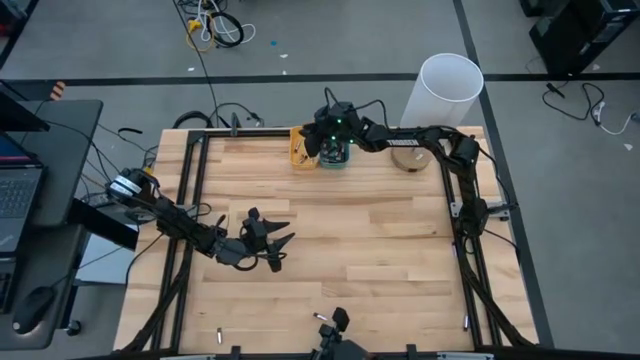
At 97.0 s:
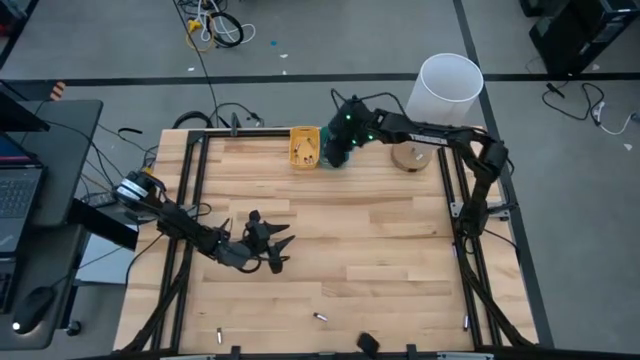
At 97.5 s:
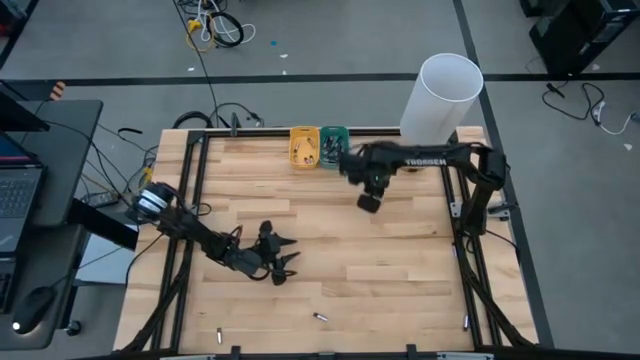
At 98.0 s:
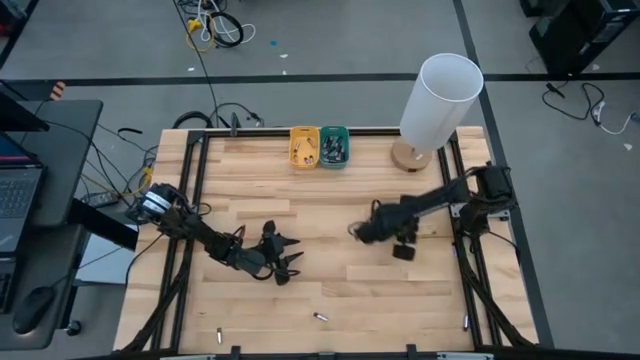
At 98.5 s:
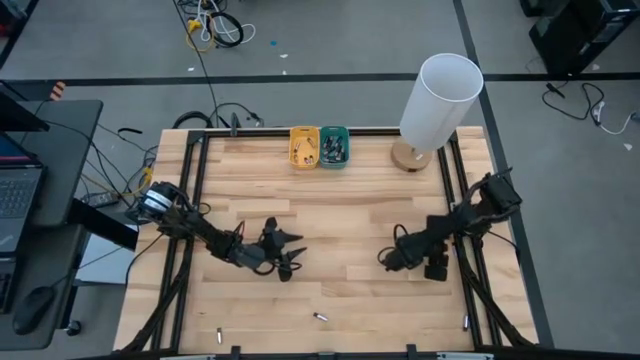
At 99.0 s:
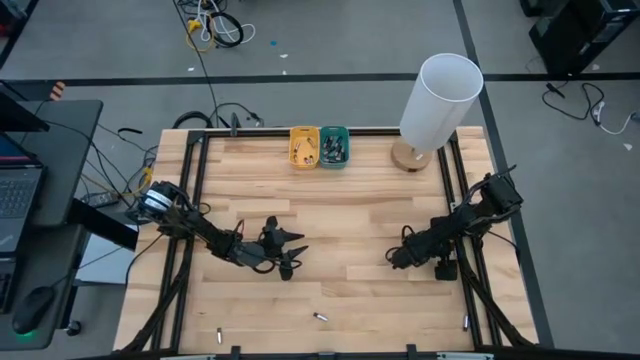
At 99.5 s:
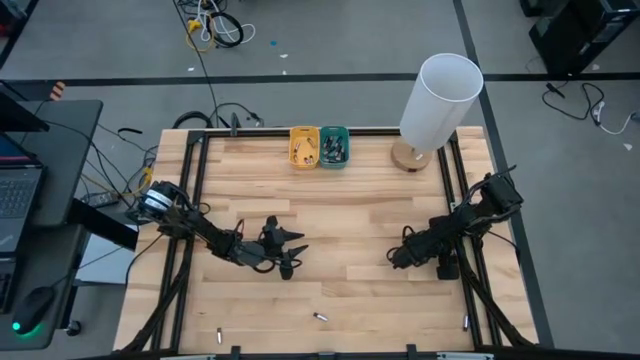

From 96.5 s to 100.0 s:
Task: Sort batteries
Put the silver battery into the yellow bin

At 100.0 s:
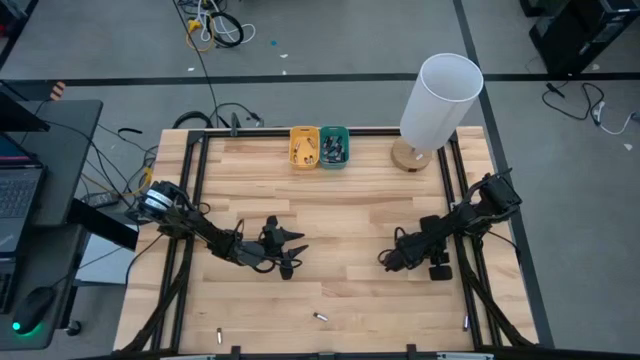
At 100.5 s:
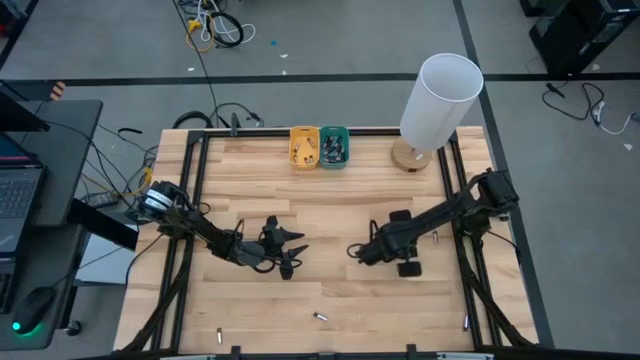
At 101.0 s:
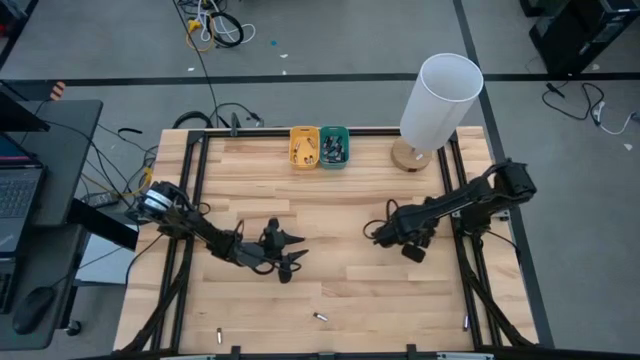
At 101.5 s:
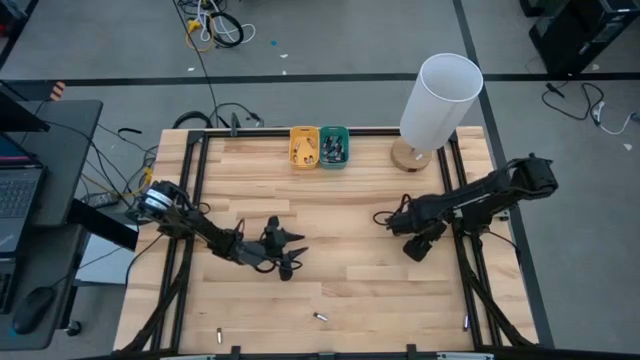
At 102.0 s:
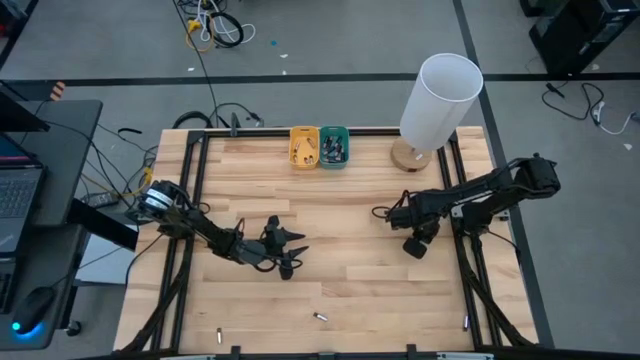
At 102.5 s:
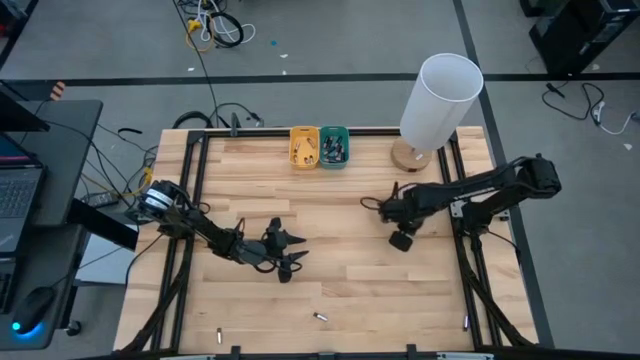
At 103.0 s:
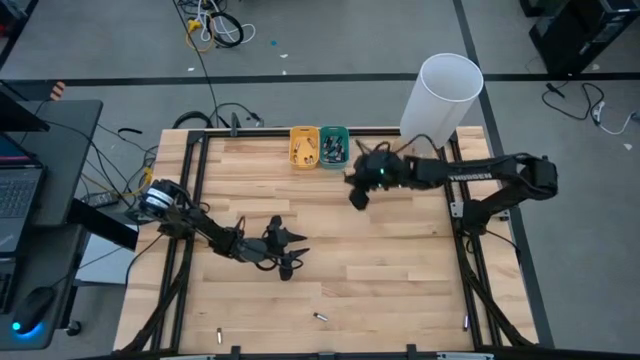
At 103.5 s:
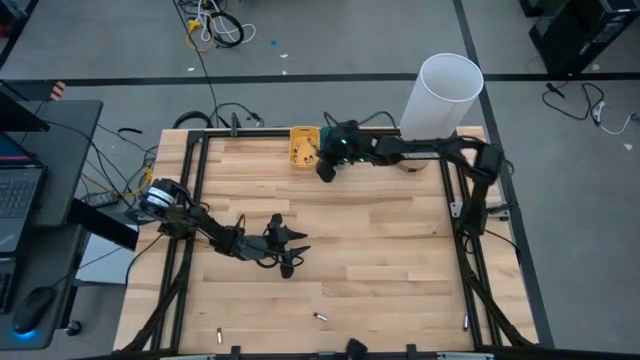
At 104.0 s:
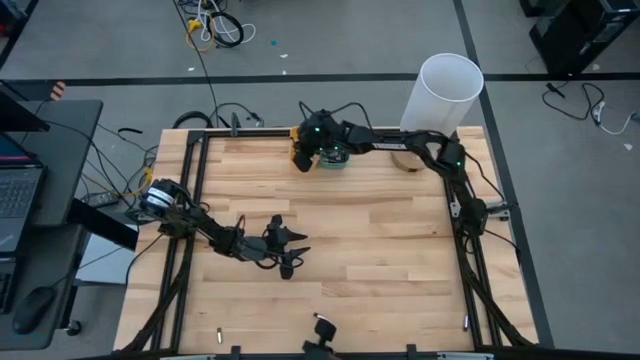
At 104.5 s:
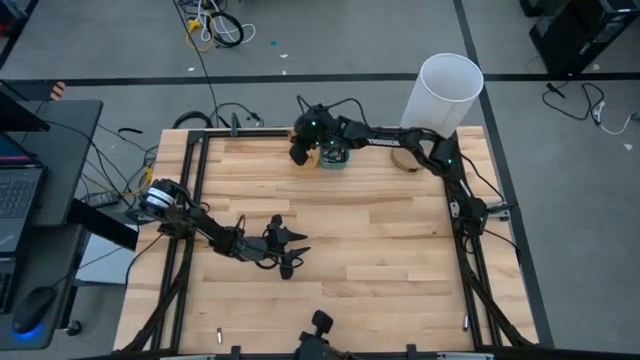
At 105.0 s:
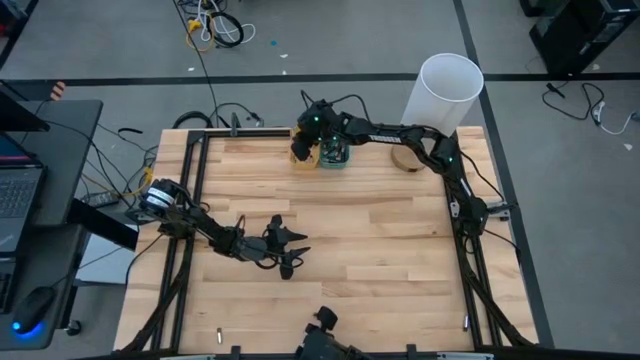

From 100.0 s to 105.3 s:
Put the silver battery into the yellow bin

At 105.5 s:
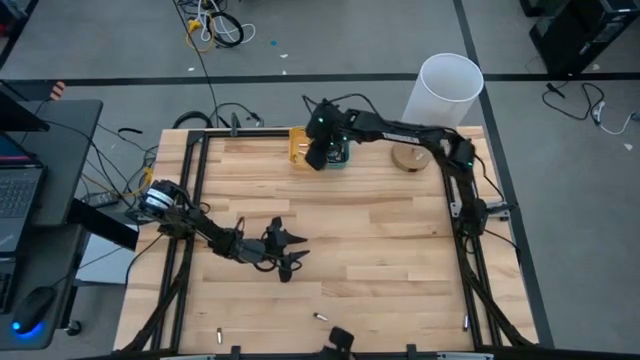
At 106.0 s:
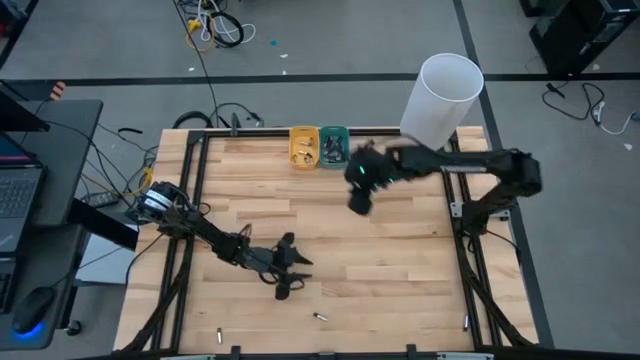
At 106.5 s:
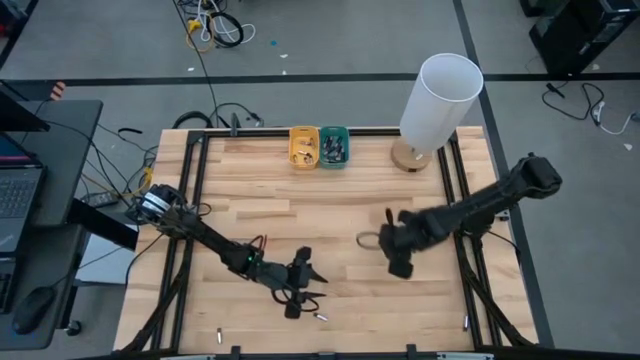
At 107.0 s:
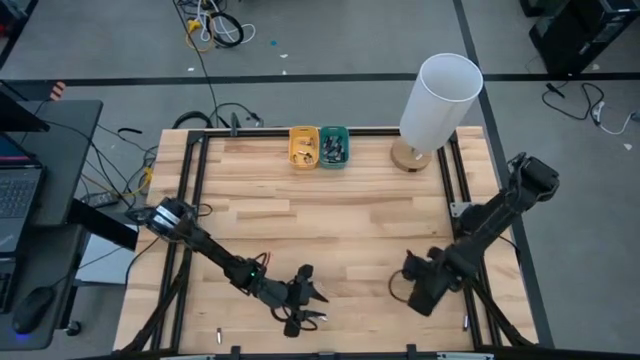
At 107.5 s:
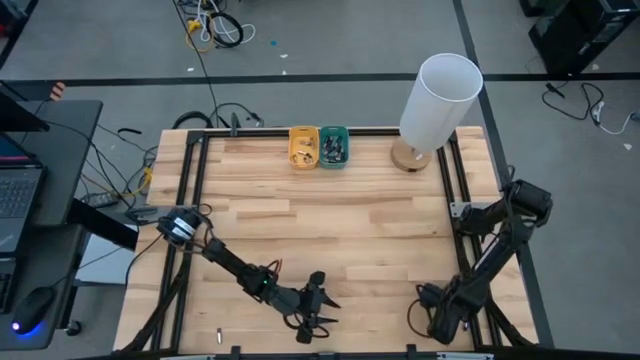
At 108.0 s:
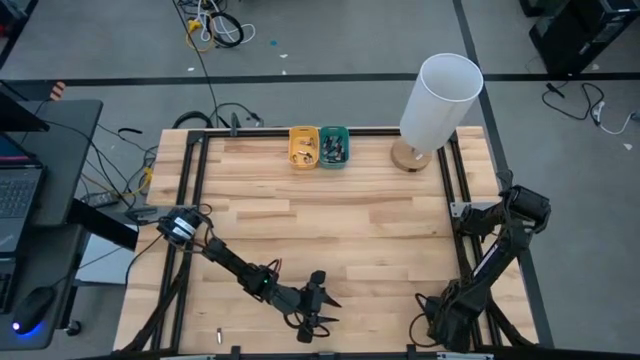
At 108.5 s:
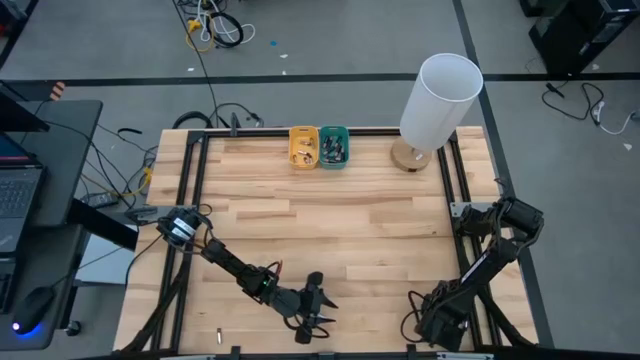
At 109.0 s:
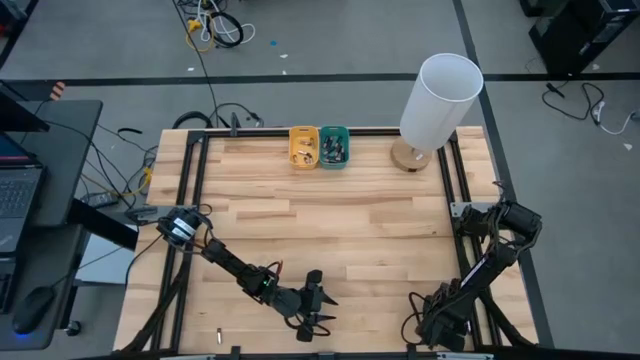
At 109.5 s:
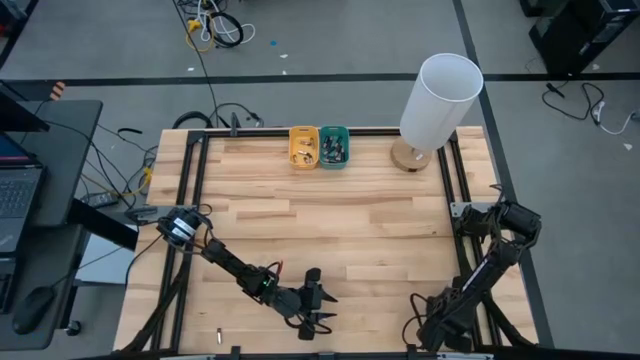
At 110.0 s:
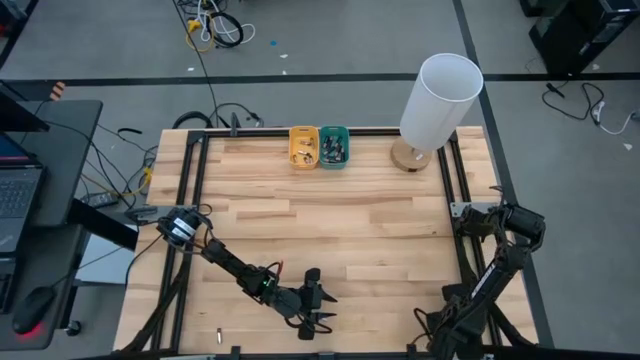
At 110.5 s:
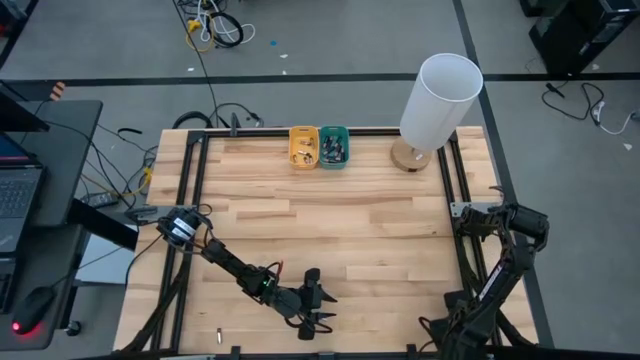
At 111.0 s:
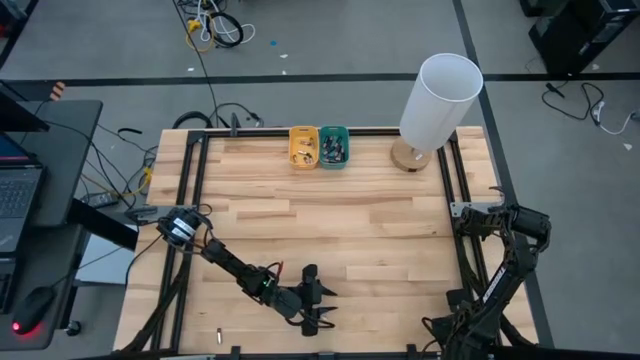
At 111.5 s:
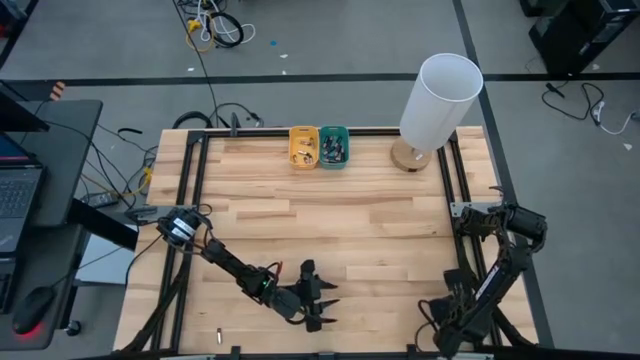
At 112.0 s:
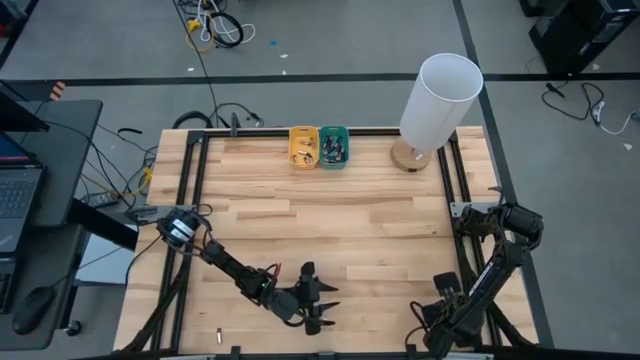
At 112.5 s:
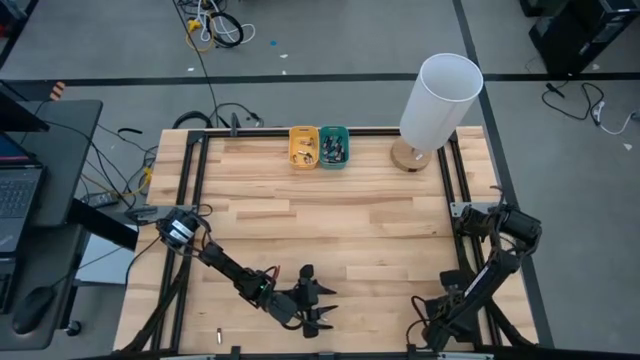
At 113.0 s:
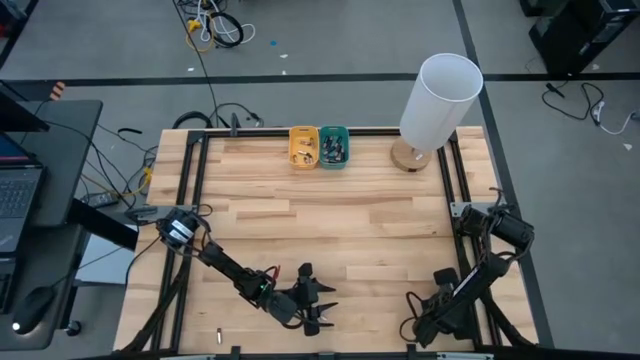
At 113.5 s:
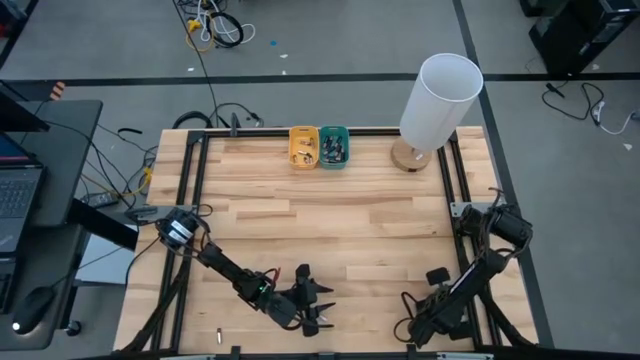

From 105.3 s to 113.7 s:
Put the silver battery into the yellow bin

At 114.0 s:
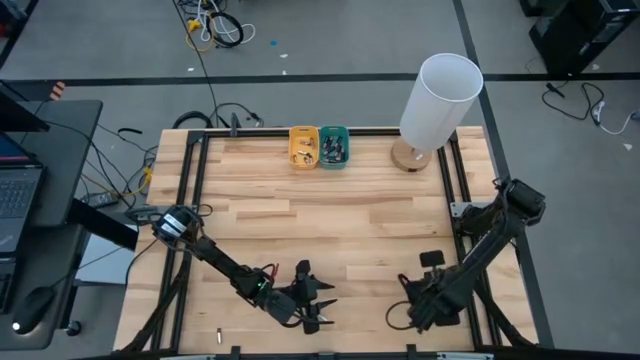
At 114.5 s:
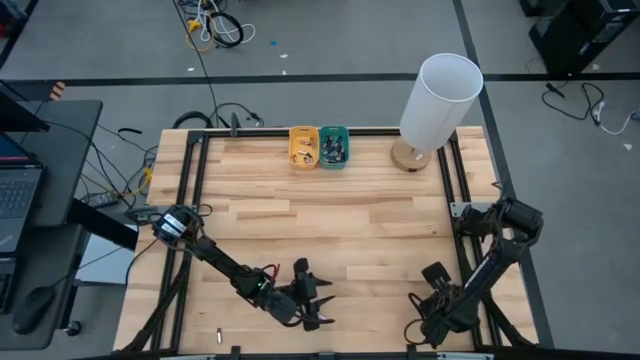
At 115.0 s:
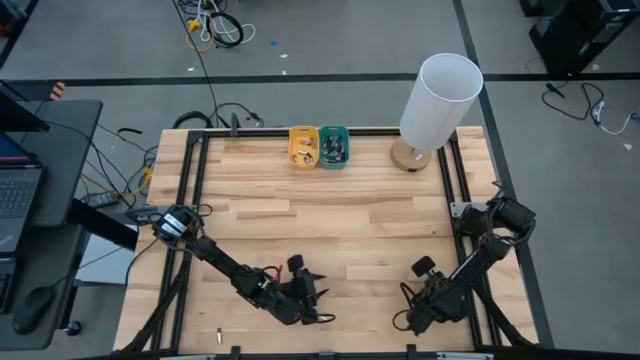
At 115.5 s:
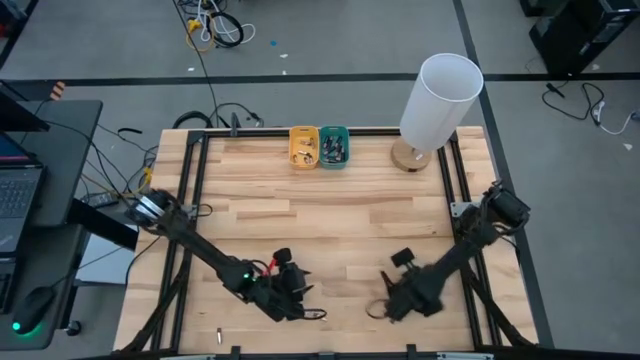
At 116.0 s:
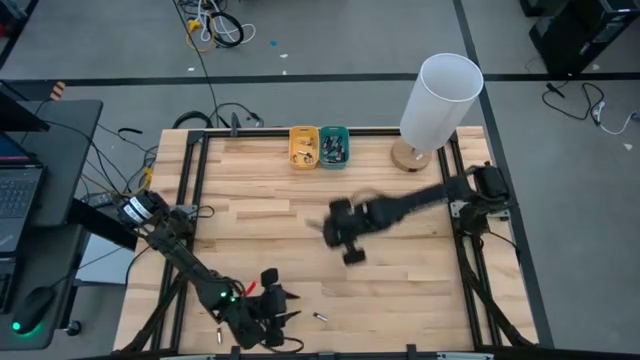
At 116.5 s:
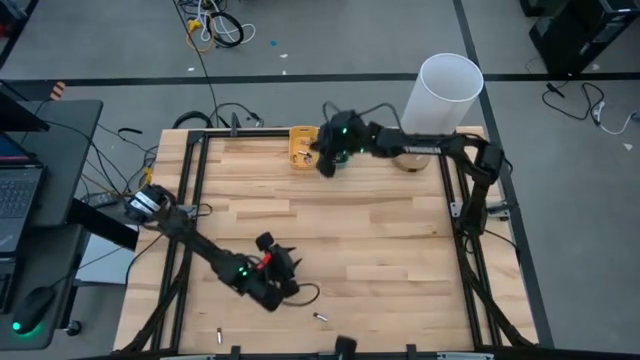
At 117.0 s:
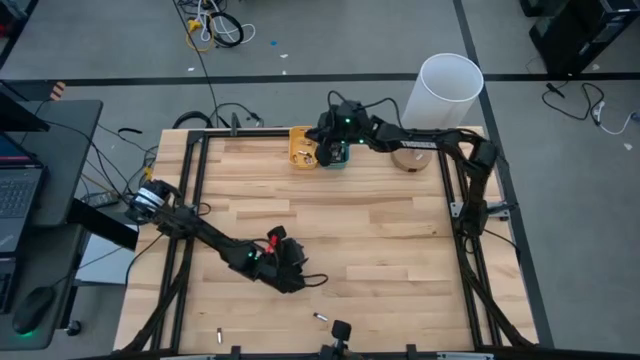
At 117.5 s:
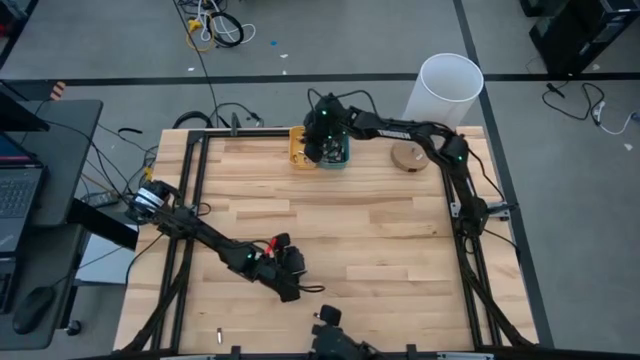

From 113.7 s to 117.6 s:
Put the silver battery into the yellow bin
